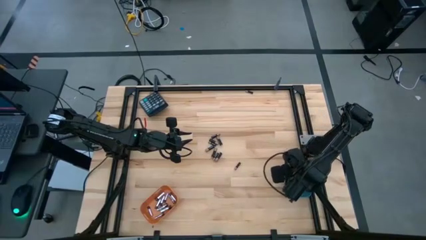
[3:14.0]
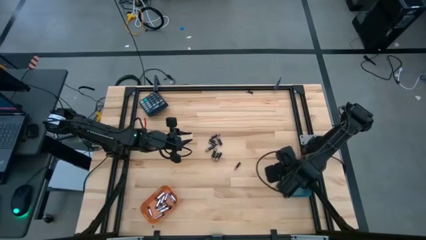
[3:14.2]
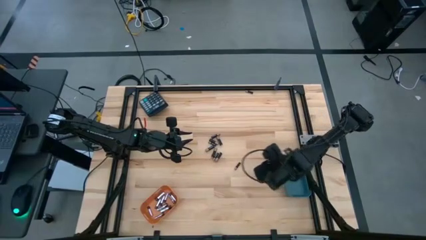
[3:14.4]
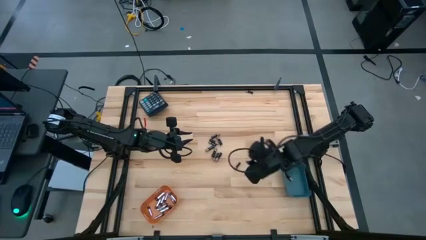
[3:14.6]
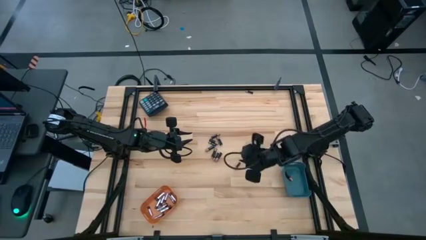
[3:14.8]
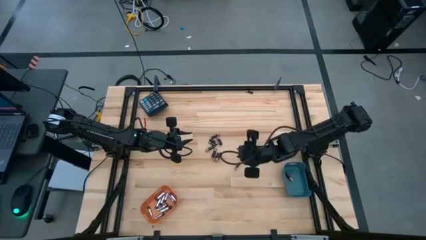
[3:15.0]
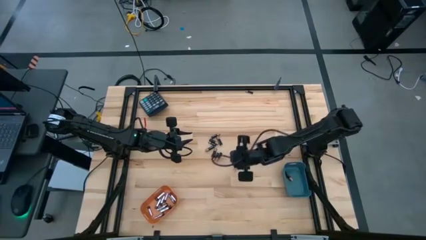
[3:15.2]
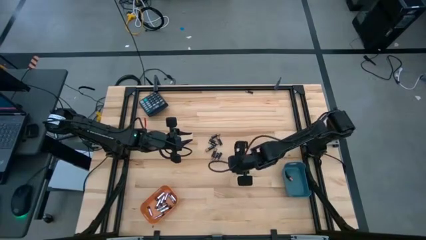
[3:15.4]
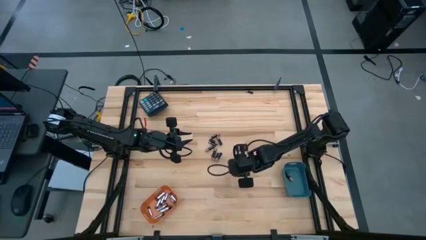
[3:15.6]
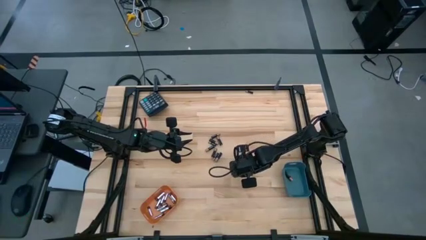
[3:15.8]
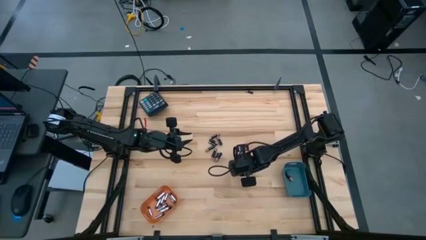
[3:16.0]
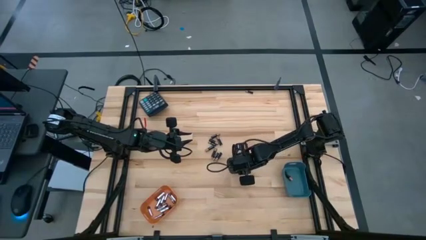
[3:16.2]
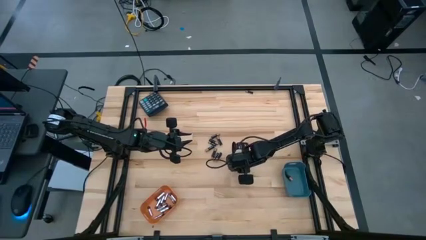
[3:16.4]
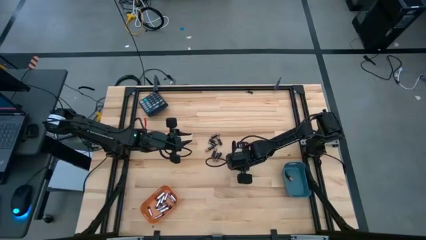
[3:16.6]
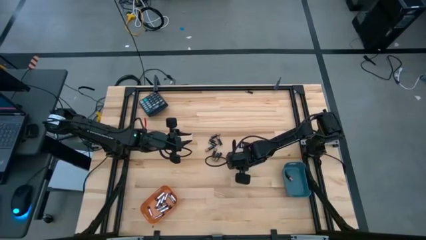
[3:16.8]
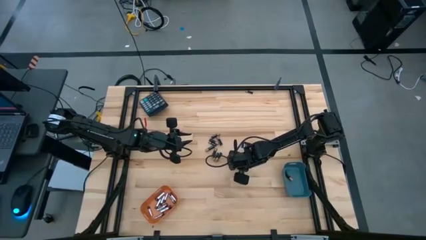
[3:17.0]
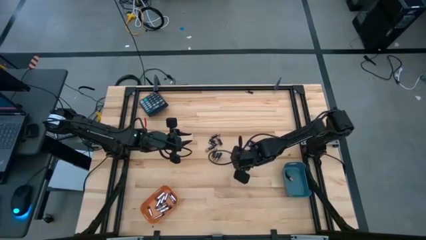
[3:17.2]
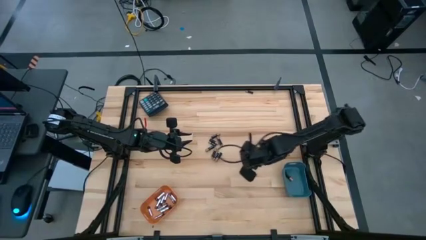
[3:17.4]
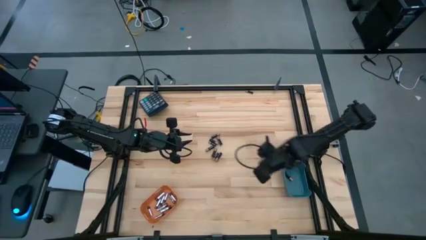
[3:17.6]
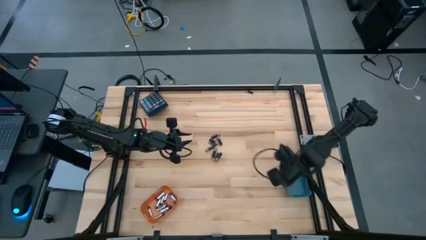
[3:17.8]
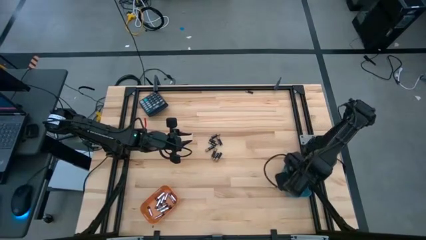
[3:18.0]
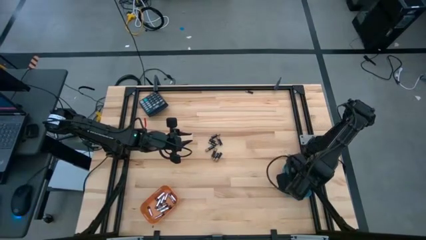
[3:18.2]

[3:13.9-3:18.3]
Task: Sort batteries
Put the black battery into the blue bin

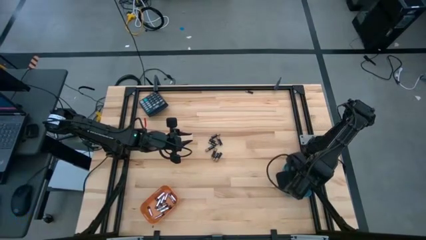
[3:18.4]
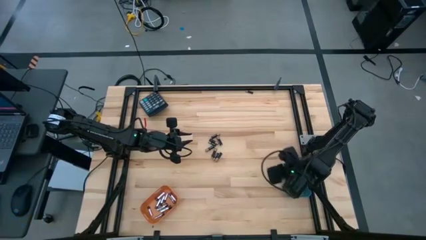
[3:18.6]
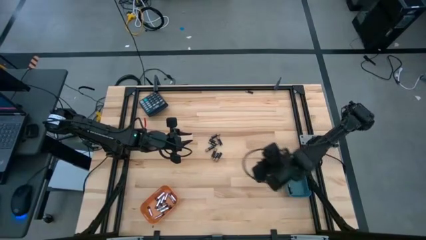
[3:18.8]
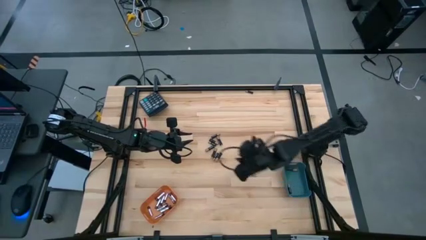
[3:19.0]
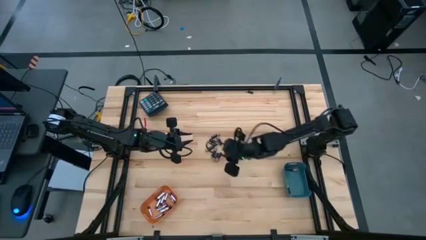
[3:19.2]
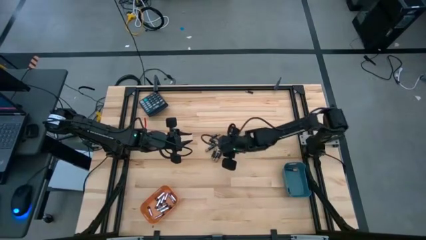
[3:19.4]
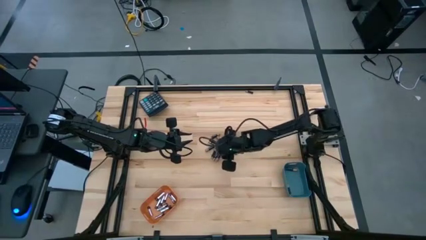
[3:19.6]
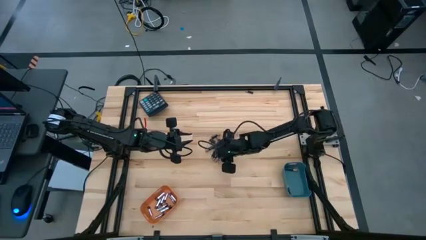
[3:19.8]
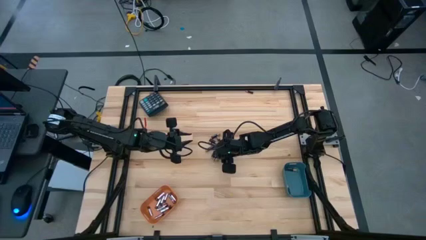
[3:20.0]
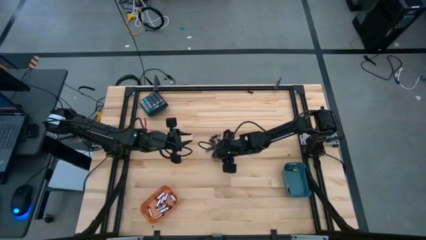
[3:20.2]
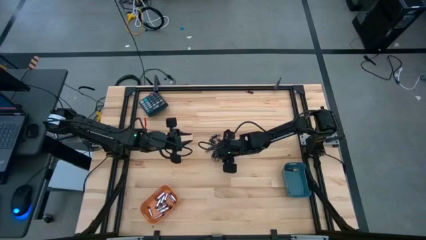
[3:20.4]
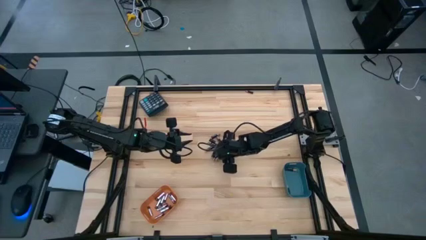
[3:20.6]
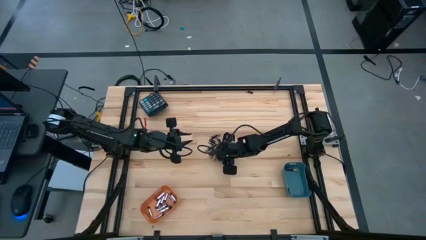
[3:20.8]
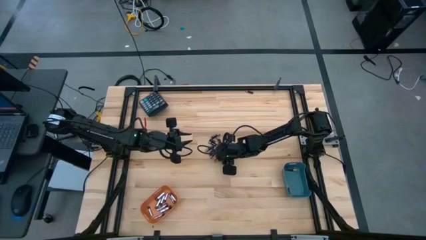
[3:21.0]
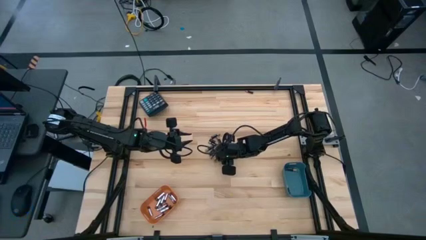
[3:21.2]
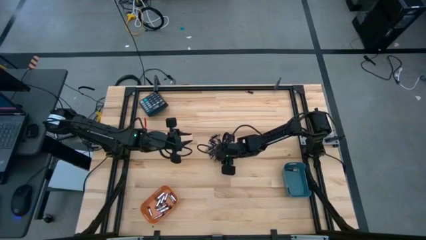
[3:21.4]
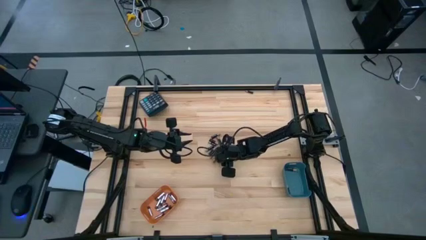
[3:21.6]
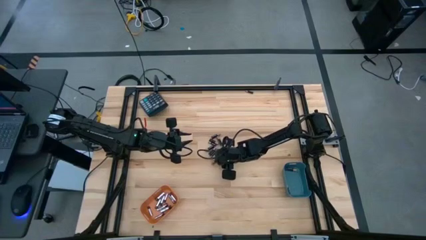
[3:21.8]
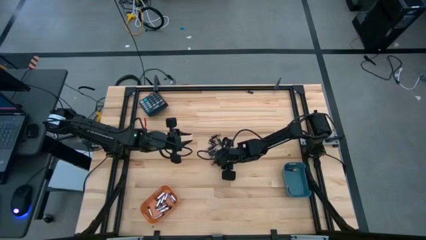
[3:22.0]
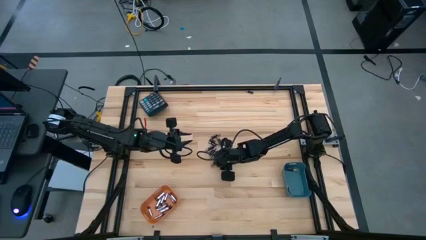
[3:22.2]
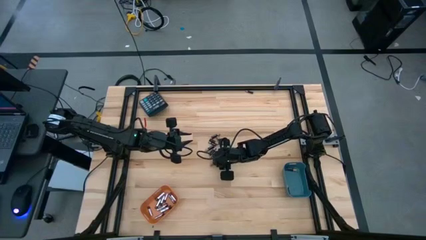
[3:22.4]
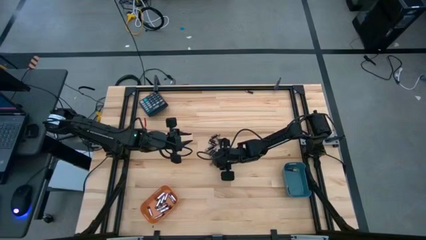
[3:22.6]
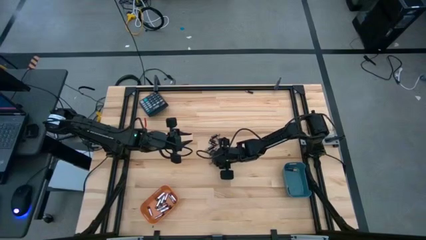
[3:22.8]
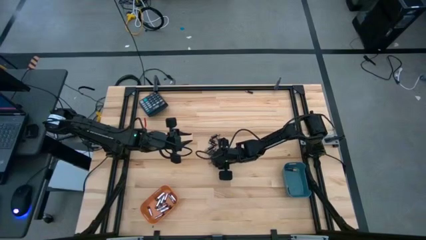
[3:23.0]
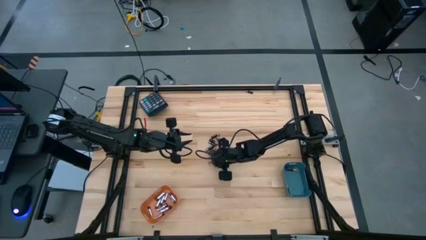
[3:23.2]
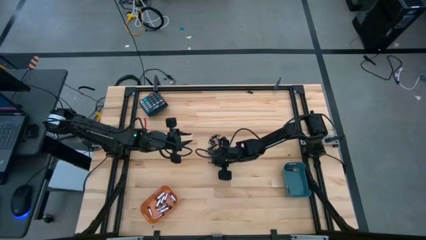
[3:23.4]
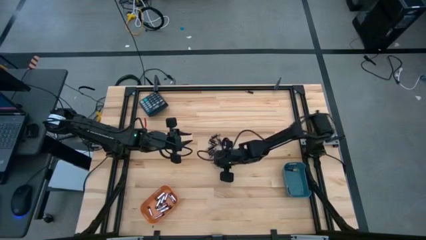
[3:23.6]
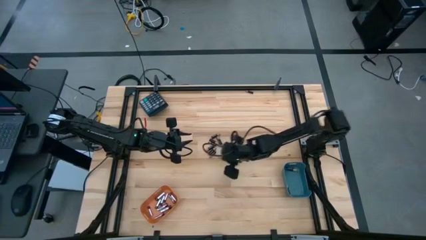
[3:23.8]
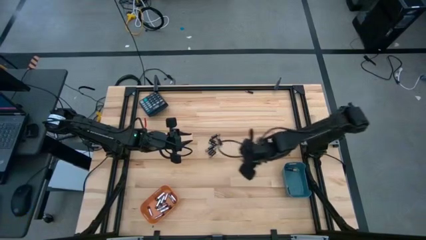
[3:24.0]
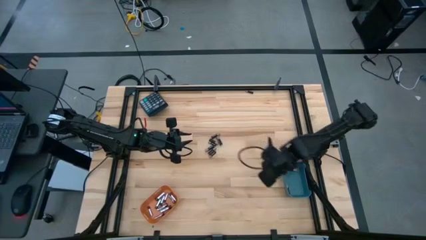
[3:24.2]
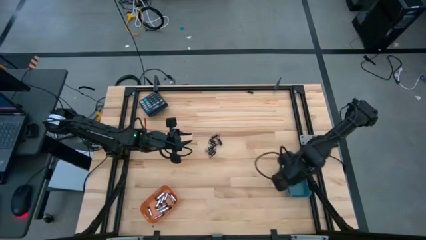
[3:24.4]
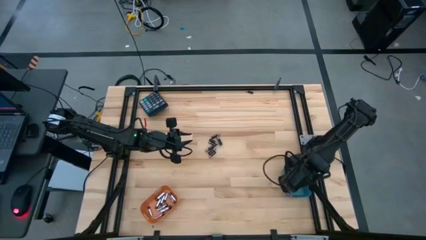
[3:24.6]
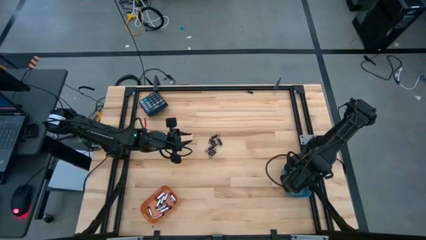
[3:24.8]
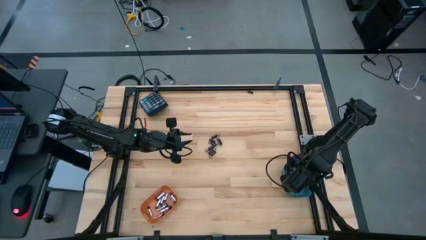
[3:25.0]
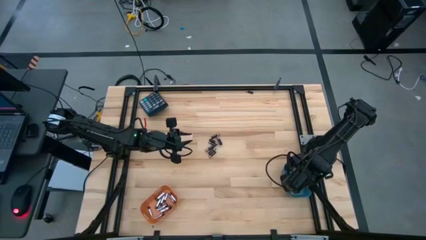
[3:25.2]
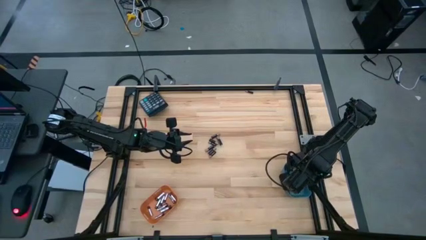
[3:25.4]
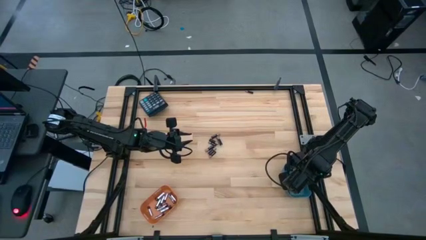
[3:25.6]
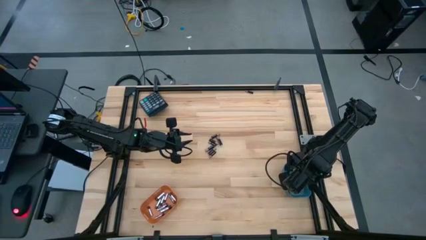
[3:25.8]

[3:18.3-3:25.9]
Put the black battery into the blue bin

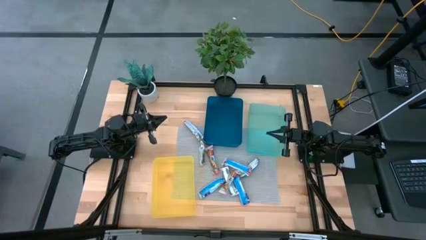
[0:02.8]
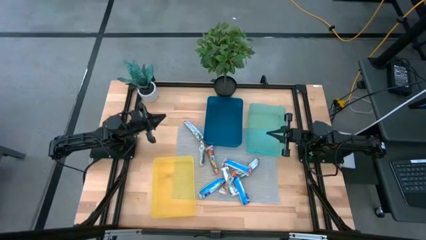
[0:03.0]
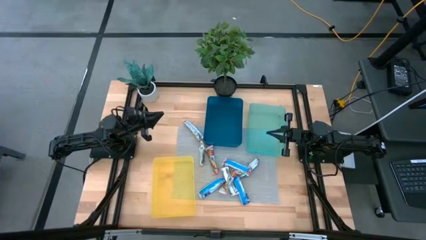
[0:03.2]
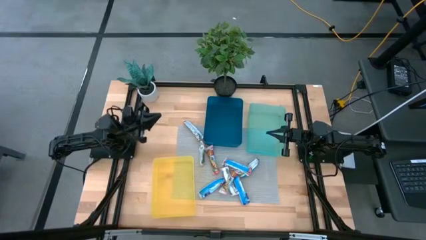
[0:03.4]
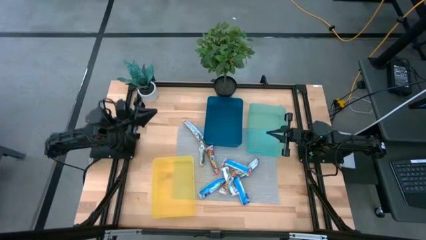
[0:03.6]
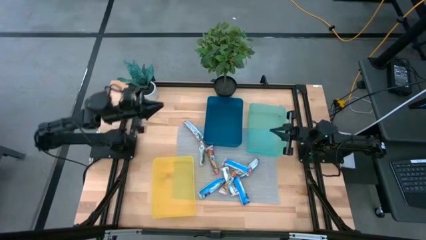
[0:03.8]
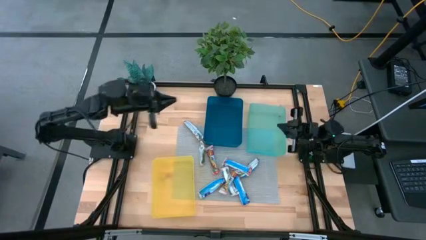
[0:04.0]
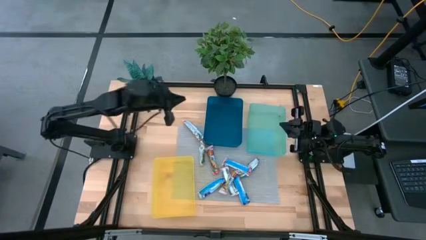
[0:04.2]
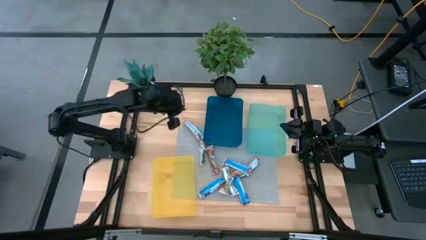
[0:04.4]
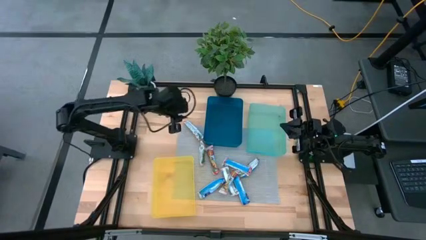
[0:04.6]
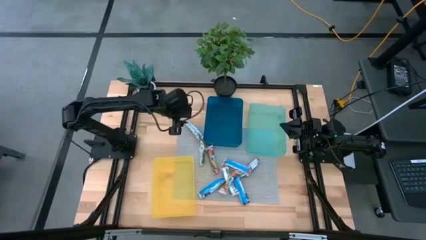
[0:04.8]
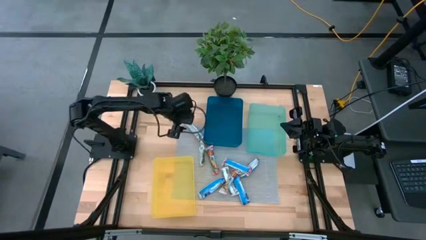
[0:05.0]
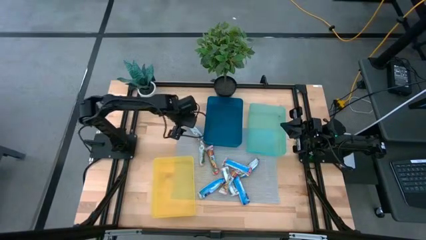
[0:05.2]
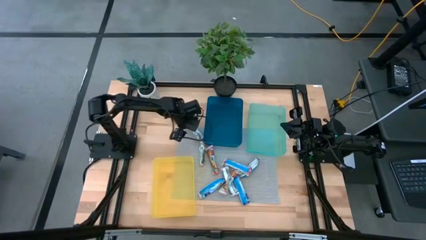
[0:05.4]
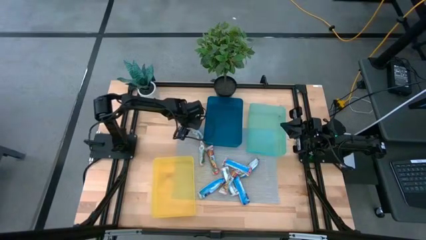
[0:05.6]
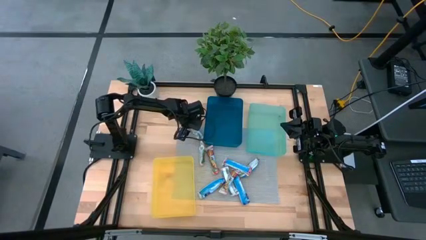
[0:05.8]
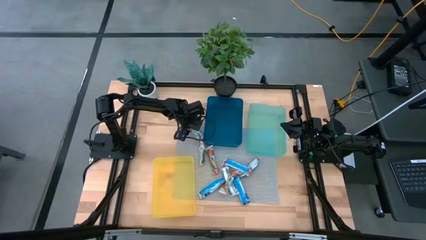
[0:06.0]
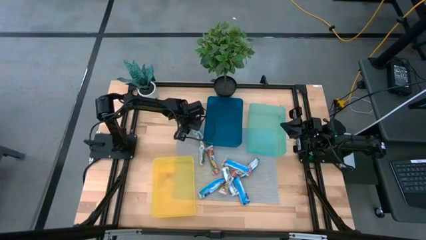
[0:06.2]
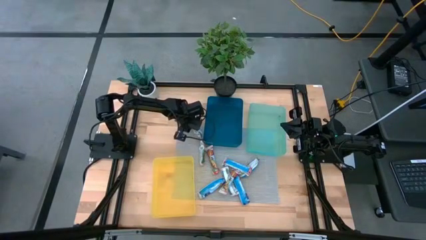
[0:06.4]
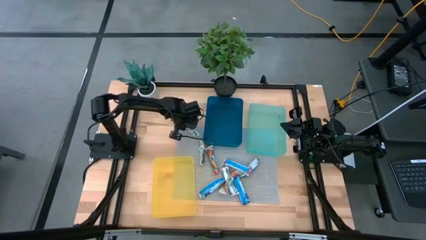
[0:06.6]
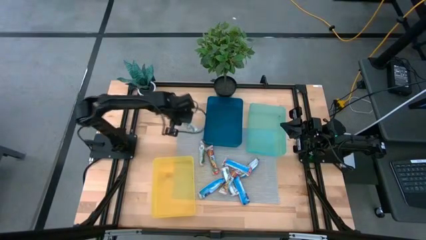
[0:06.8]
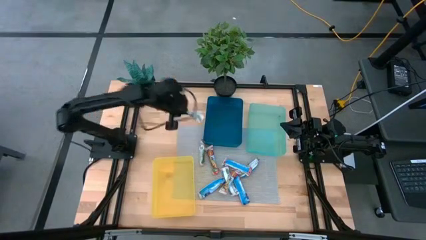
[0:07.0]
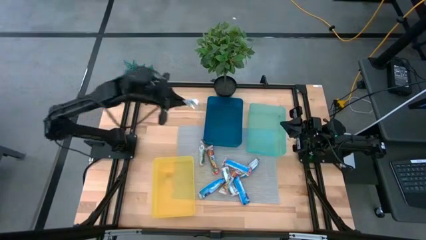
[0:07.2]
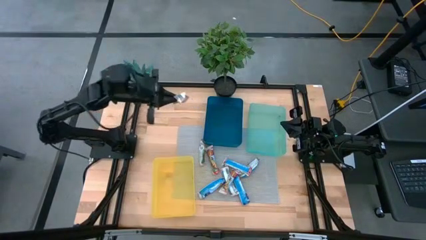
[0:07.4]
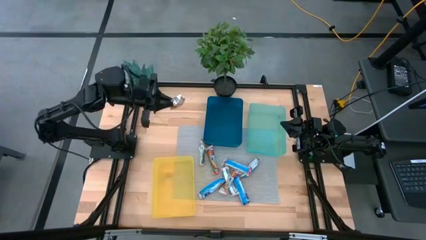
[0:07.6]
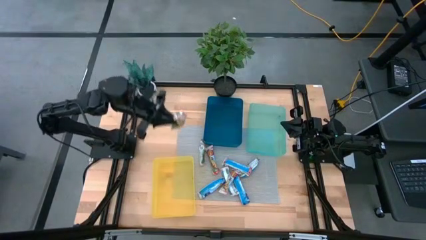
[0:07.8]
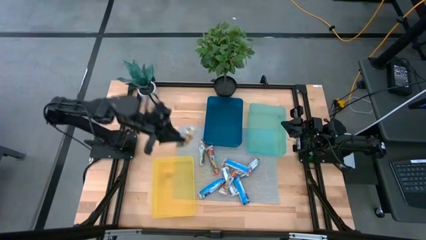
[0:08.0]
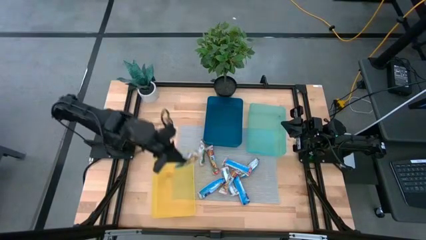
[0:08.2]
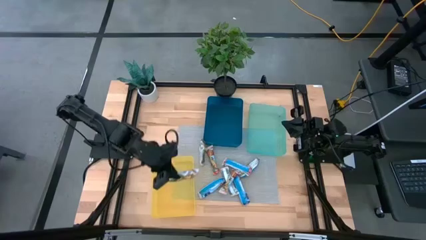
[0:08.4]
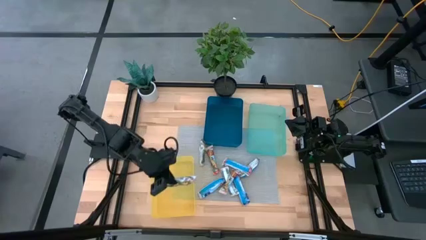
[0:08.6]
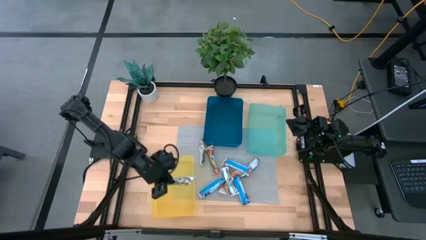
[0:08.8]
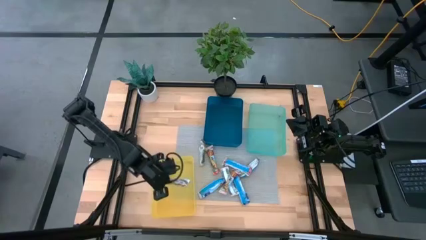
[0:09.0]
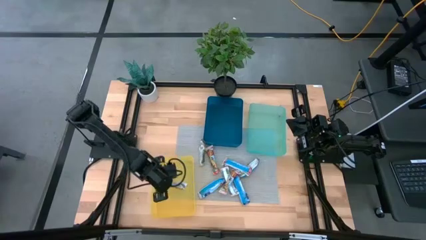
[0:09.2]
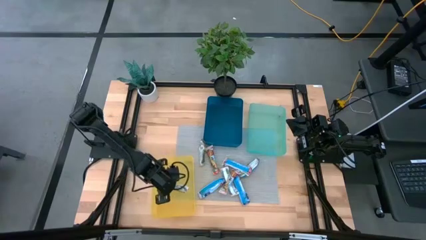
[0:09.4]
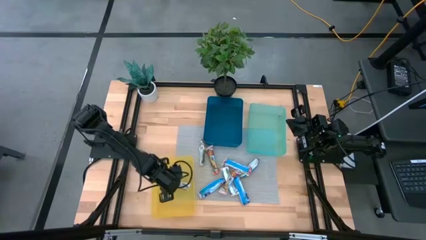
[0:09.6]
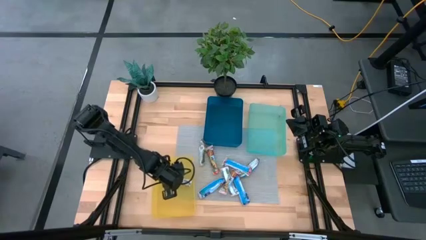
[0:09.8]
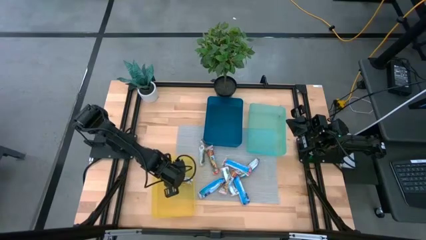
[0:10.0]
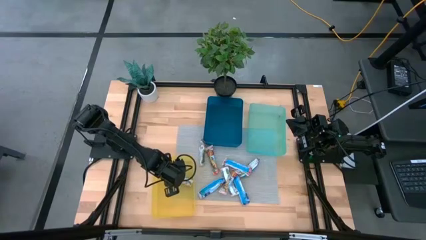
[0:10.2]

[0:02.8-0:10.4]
Task: Pick and place Granola Bars by type
Put the yellow granola bar into the yellow bin
